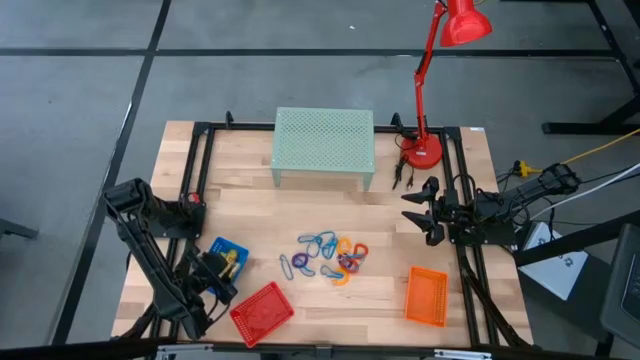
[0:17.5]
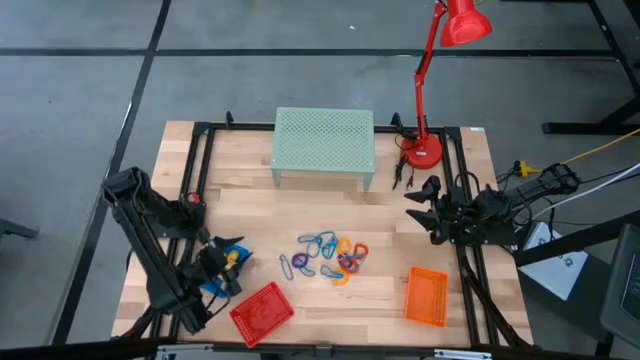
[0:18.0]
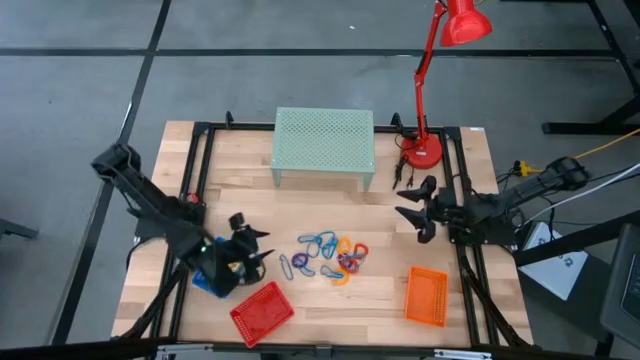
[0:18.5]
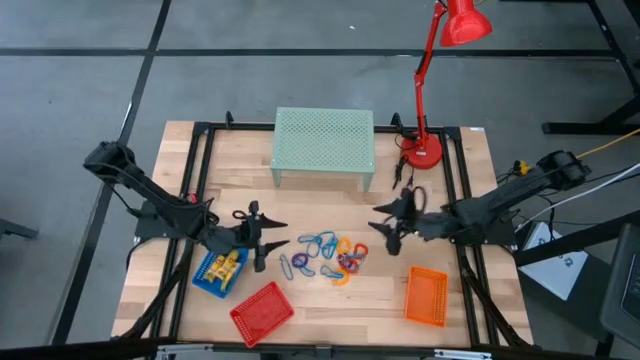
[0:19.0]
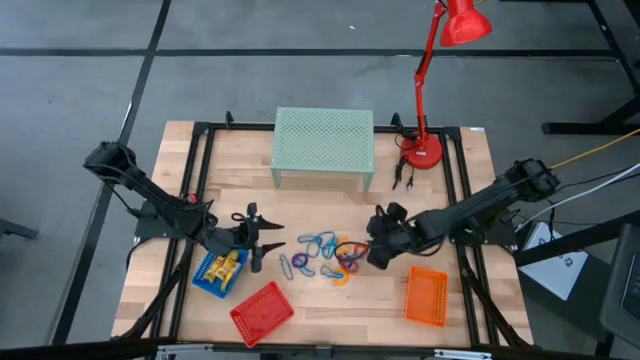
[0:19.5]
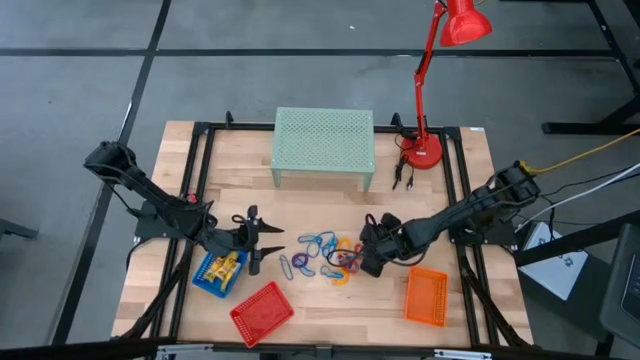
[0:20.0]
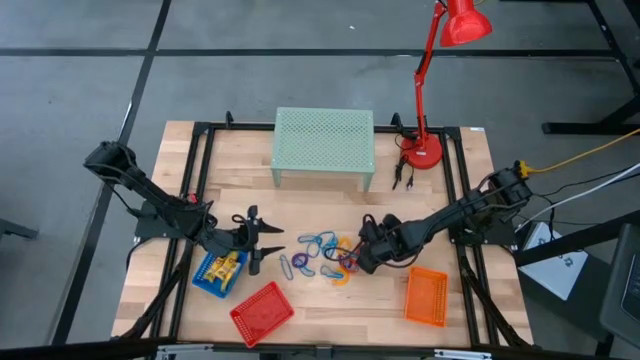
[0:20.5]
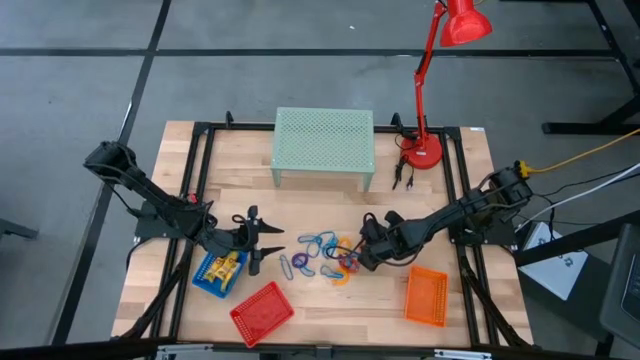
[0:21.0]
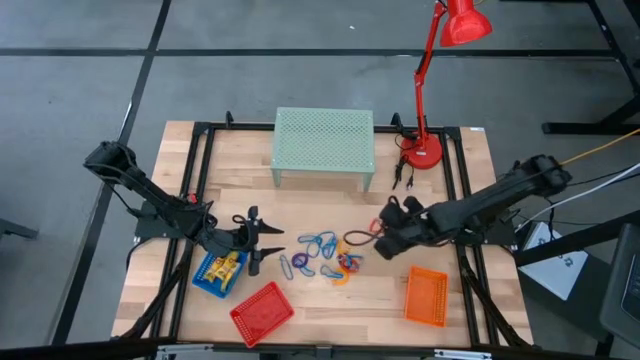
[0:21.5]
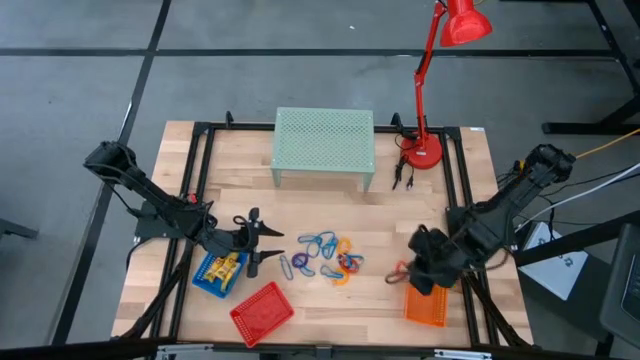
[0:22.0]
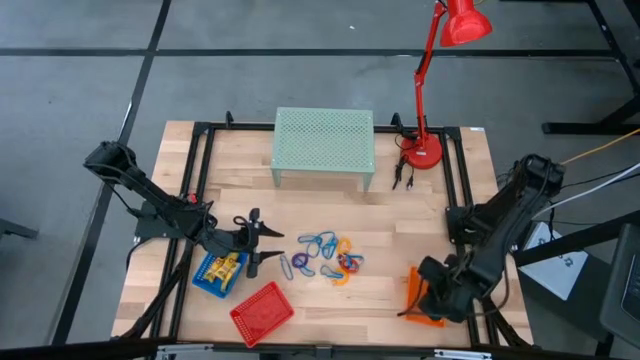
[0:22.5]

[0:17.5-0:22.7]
Task: Pick & Place Office Desk Supplies
Put the orange spring keychain into the orange bin

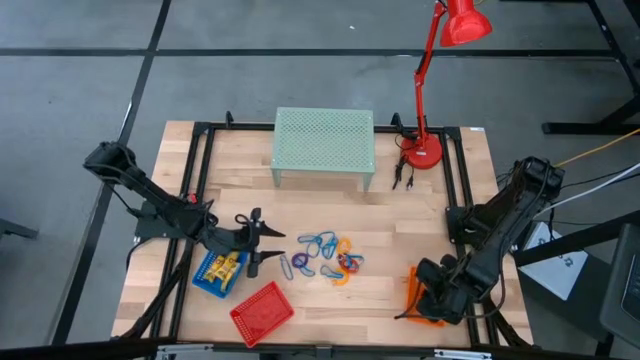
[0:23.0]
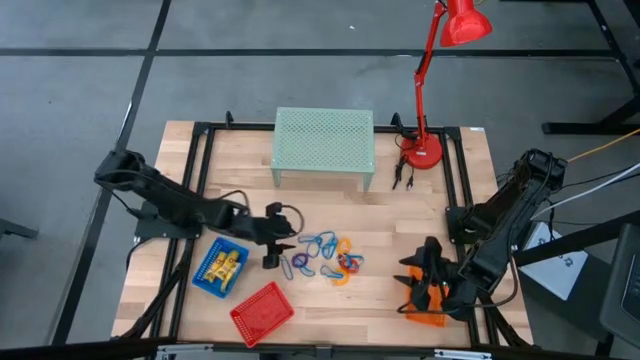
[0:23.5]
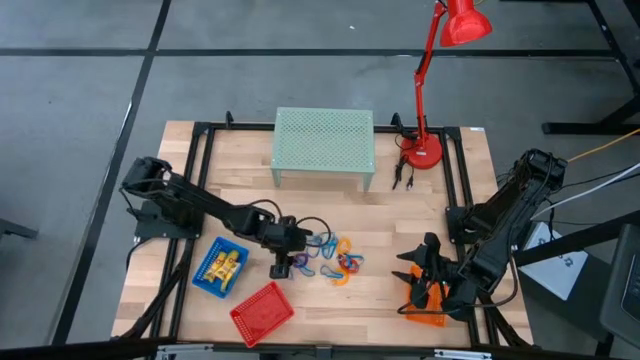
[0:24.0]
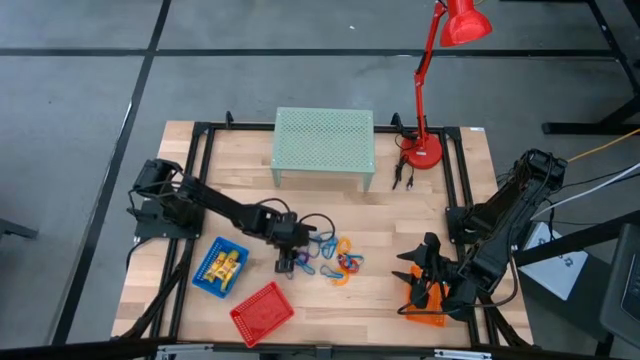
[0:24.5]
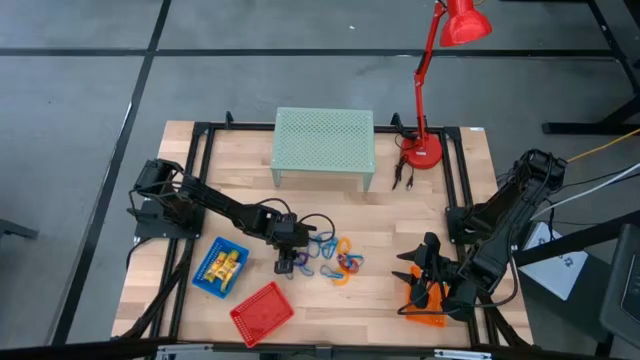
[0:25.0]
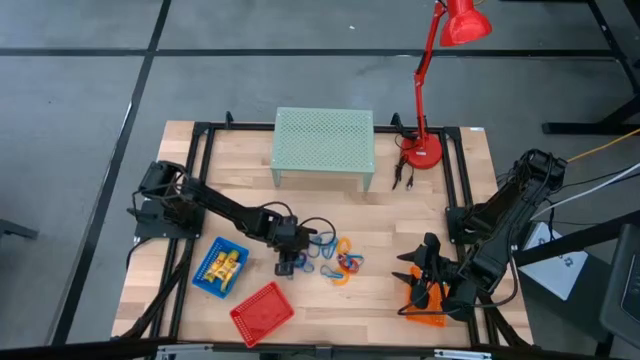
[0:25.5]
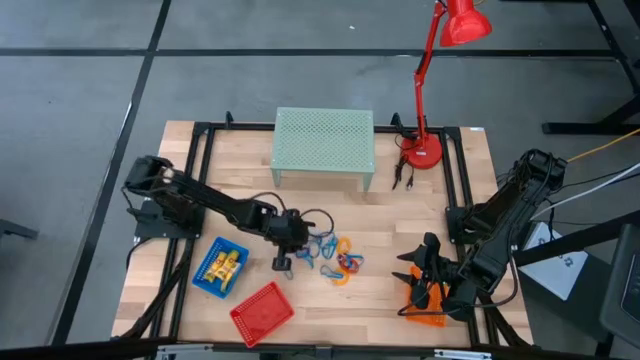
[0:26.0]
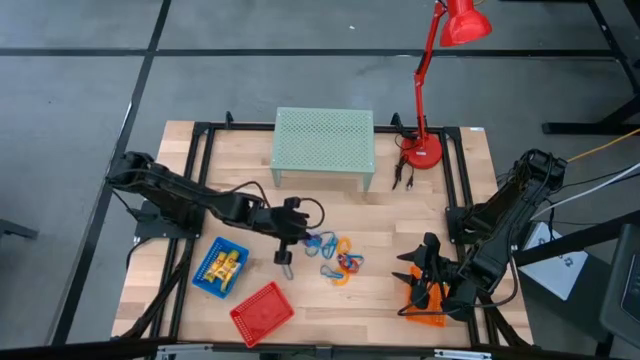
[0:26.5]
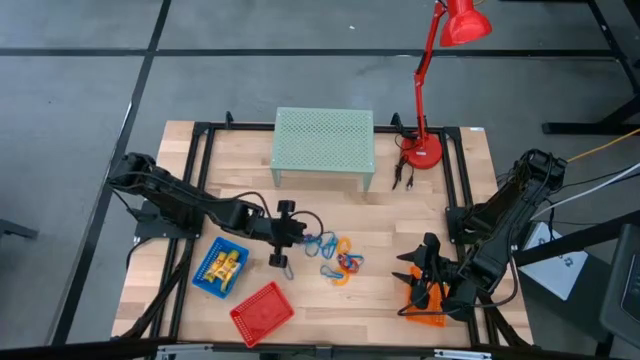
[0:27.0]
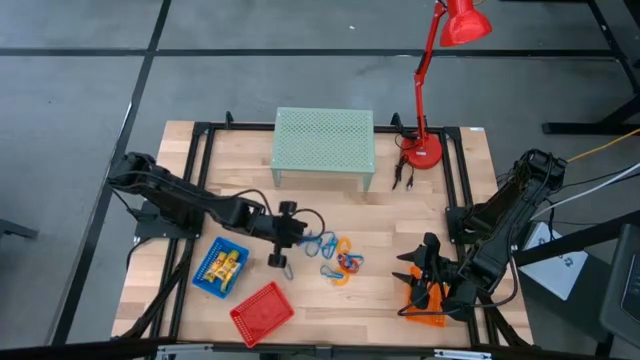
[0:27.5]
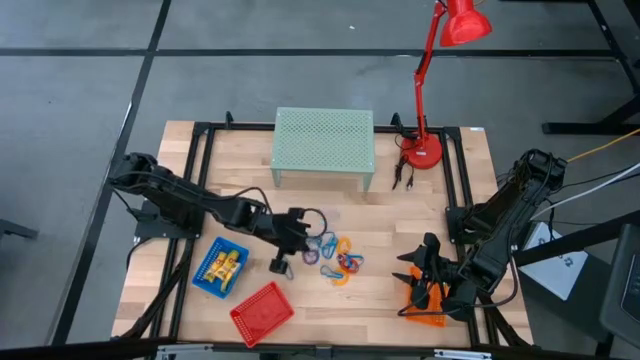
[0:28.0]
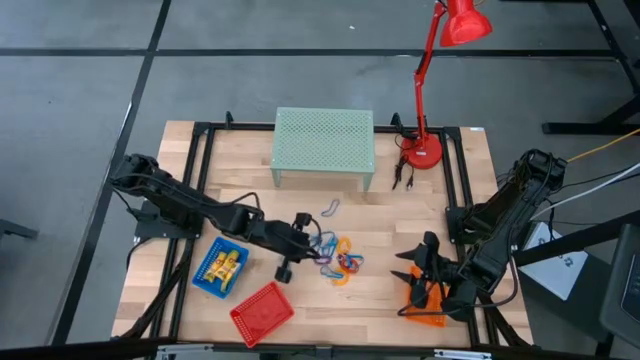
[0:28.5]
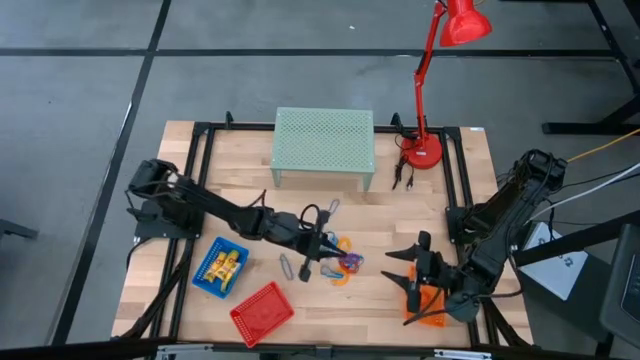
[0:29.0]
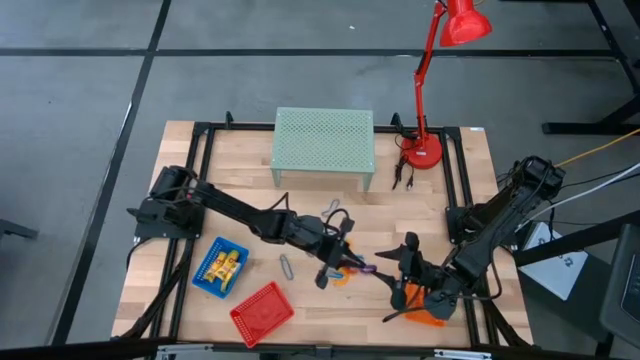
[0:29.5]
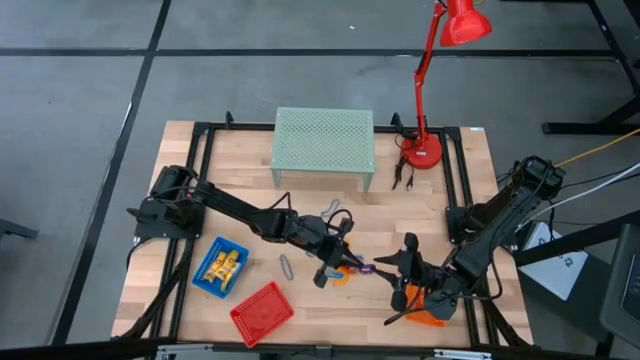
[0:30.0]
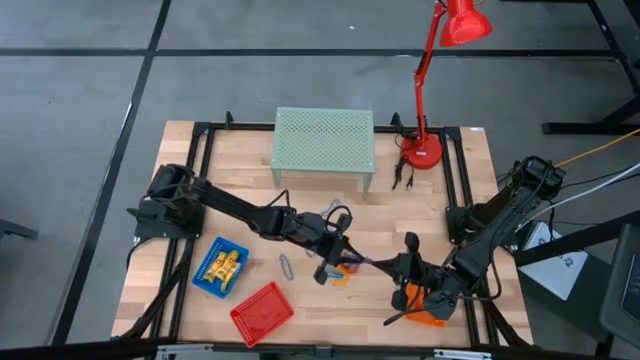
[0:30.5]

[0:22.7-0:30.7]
Put the violet spring keychain into the orange bin

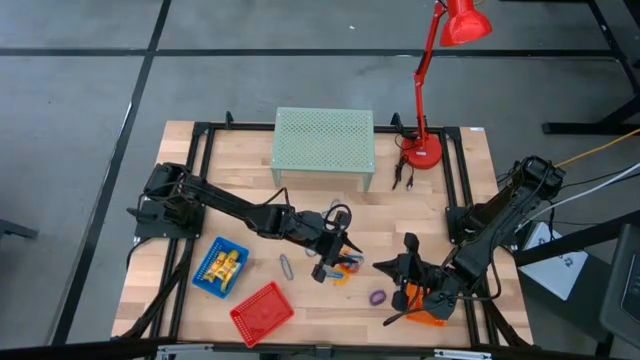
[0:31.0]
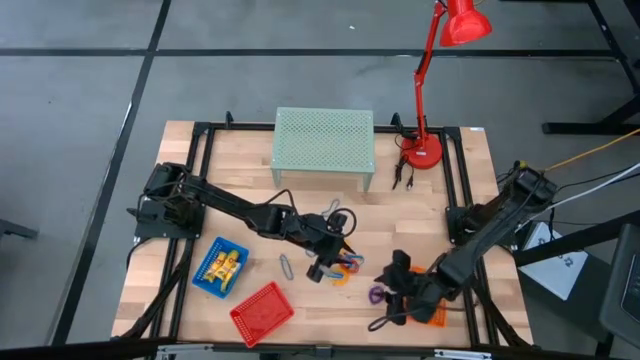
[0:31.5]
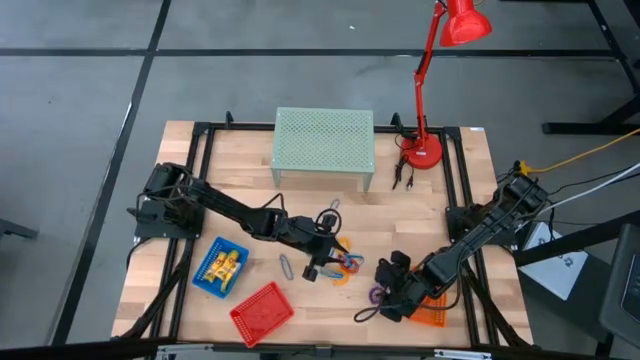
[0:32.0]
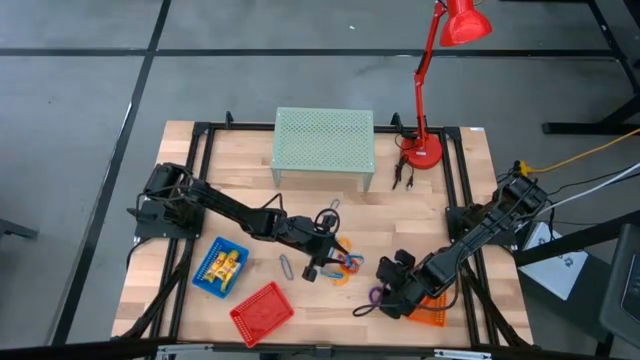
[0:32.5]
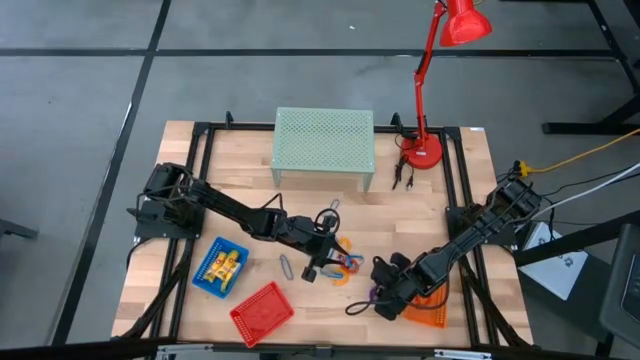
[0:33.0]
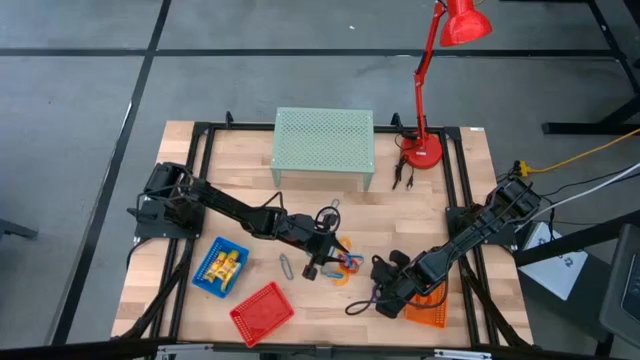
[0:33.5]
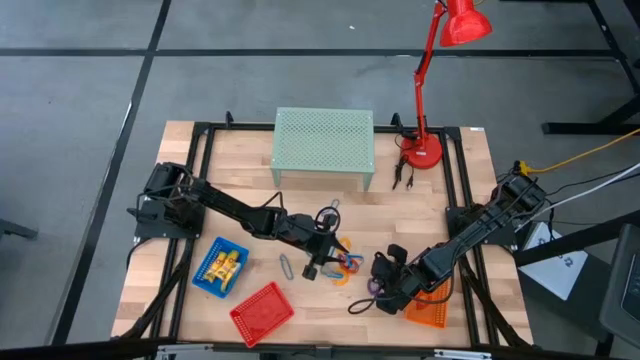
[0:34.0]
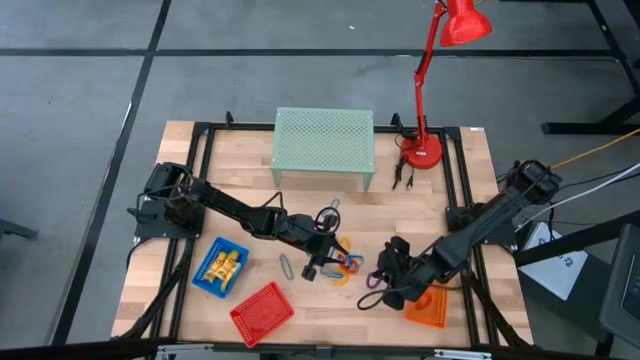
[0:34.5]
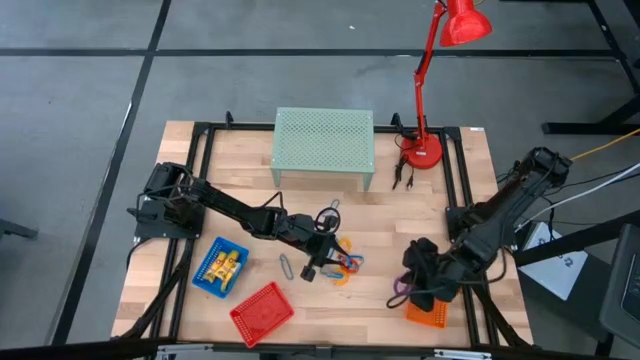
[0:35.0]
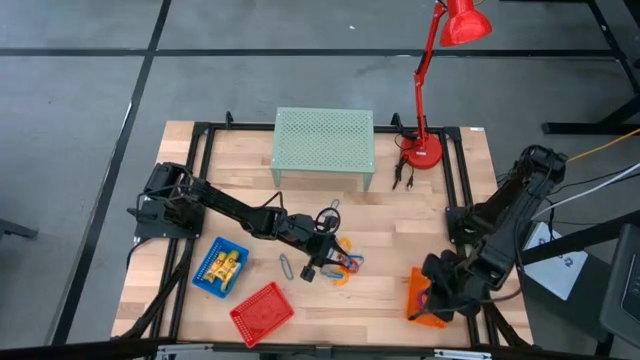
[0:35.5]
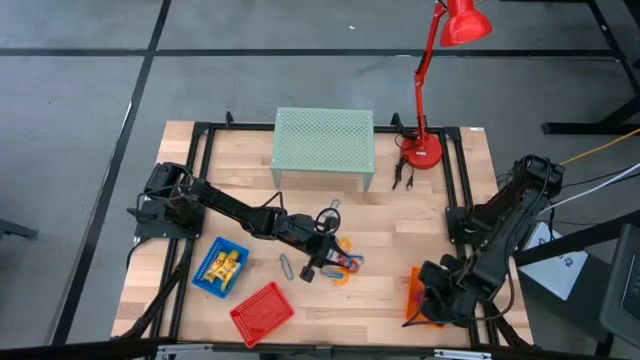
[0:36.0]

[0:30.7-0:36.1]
Put the violet spring keychain into the orange bin

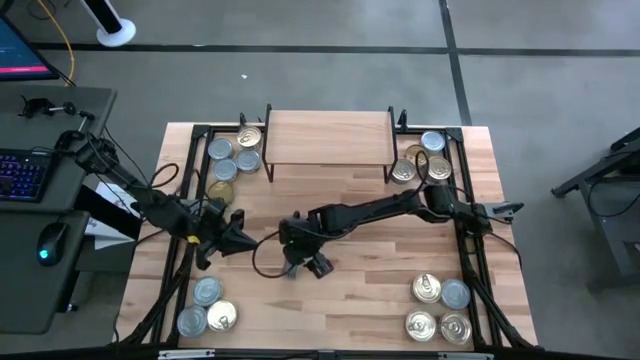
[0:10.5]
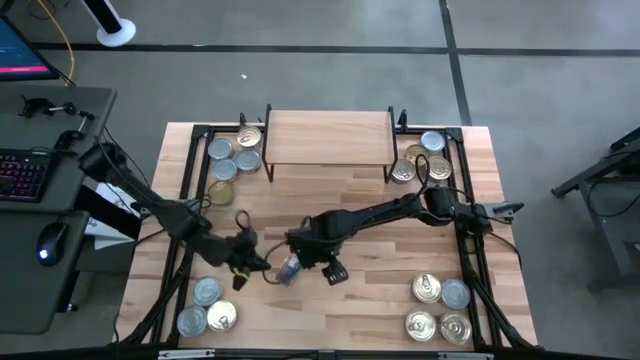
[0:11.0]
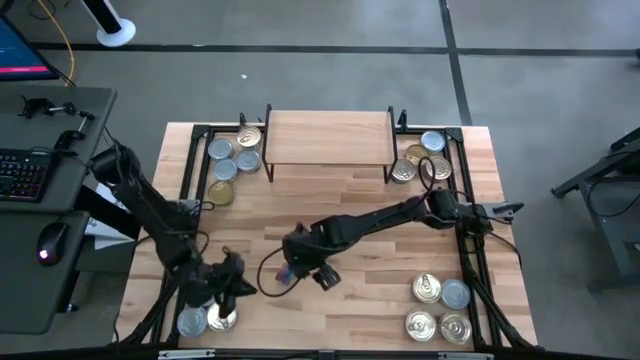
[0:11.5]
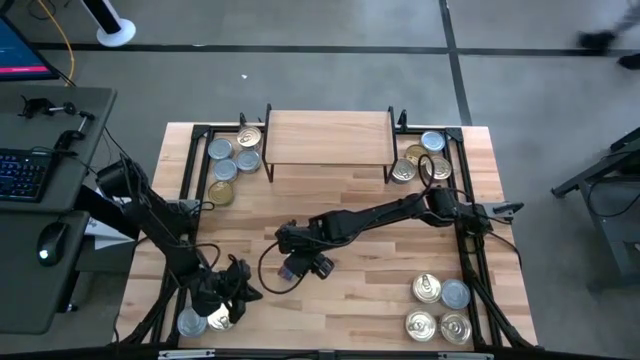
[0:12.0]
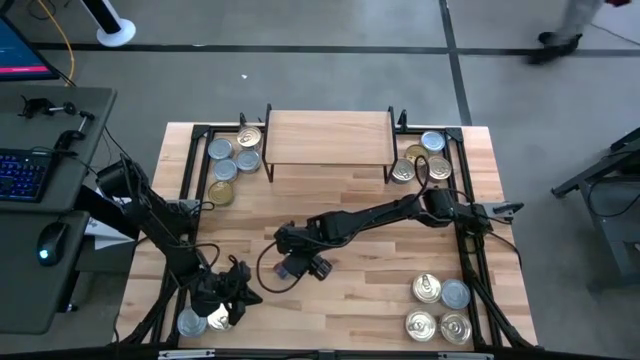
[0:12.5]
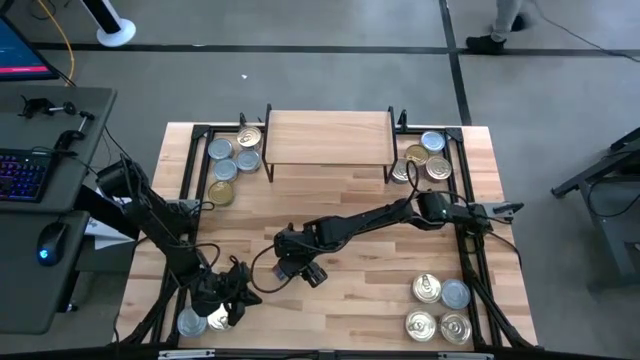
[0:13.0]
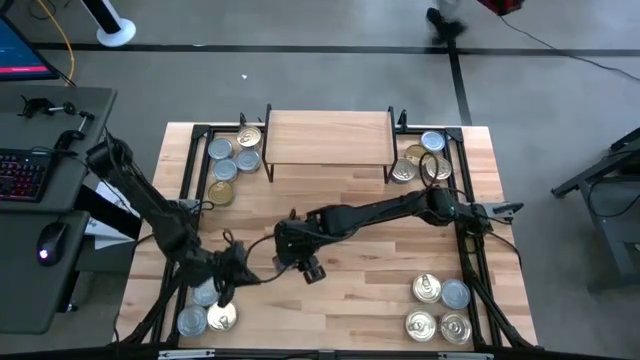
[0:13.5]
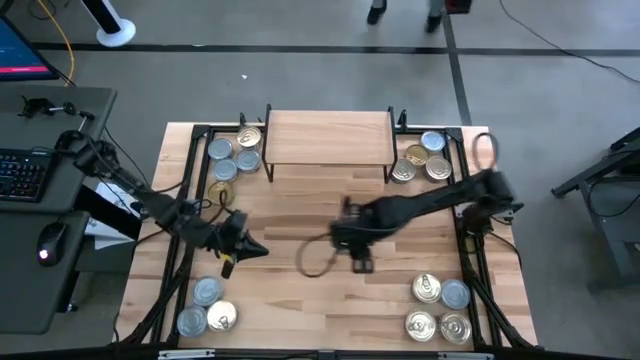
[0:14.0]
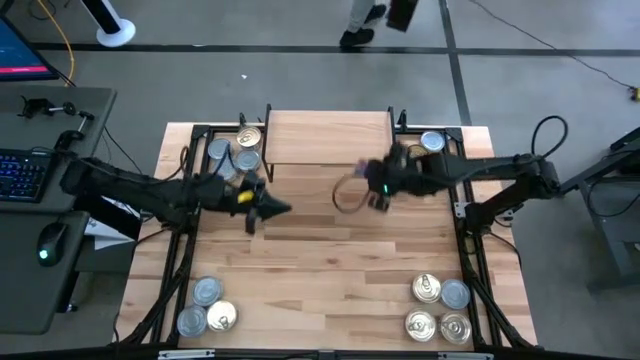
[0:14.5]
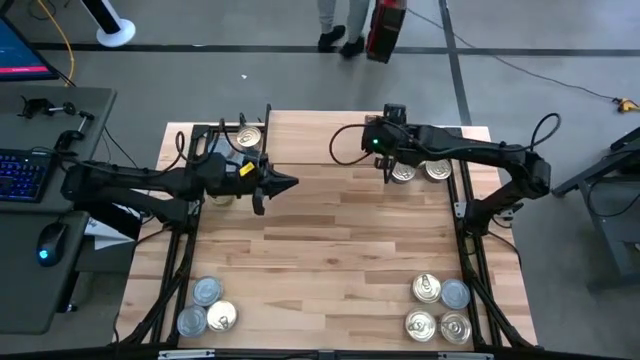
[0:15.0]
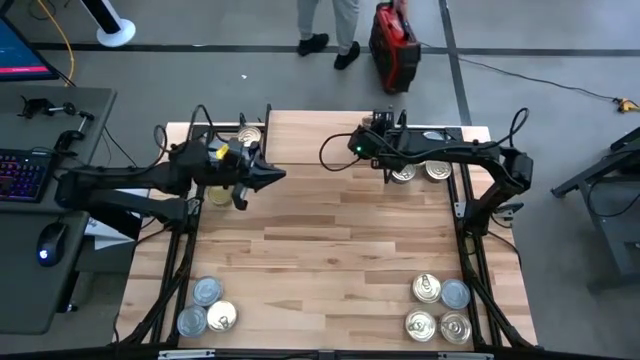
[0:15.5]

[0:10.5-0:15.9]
Task: Stack canned seafood by type on shelf
Put the blue pink tuna can on the shelf
